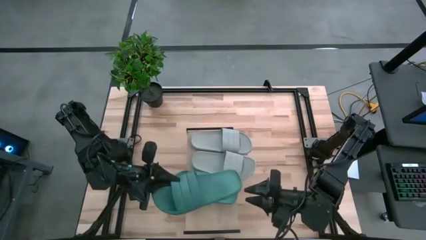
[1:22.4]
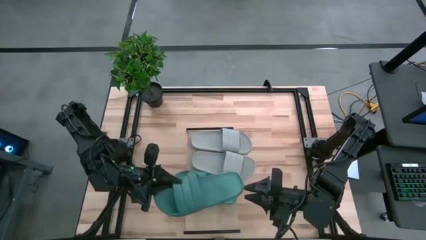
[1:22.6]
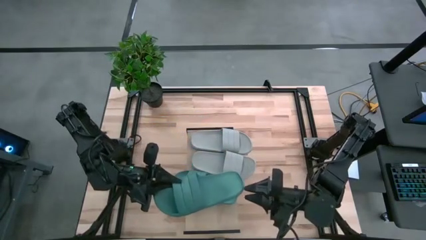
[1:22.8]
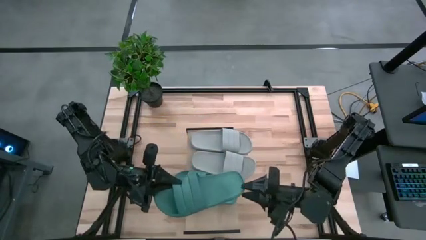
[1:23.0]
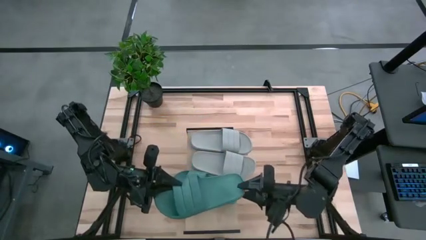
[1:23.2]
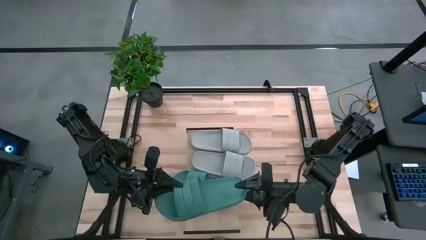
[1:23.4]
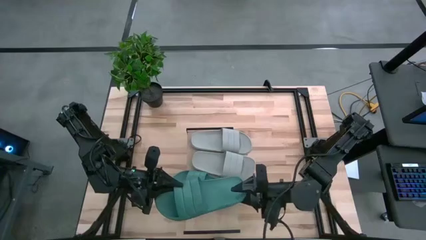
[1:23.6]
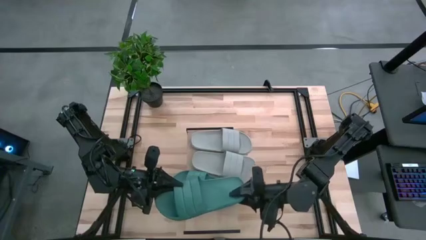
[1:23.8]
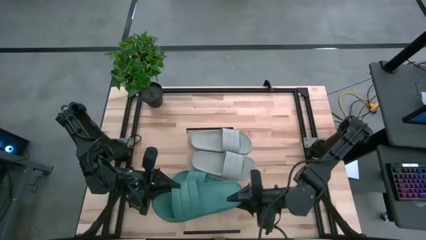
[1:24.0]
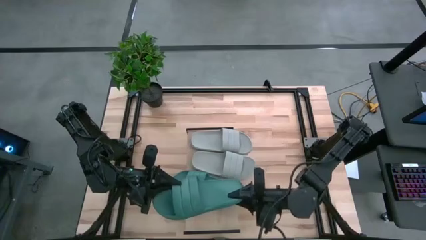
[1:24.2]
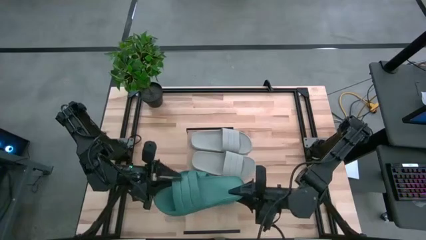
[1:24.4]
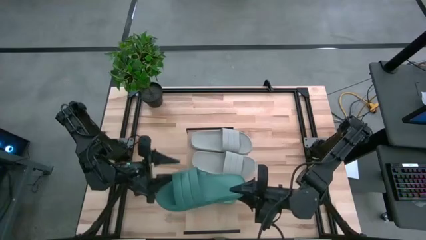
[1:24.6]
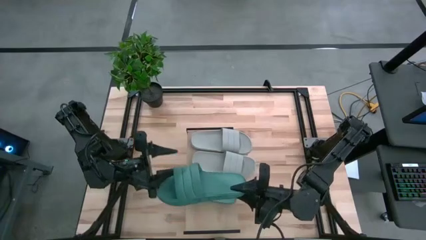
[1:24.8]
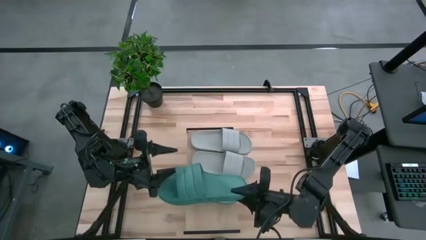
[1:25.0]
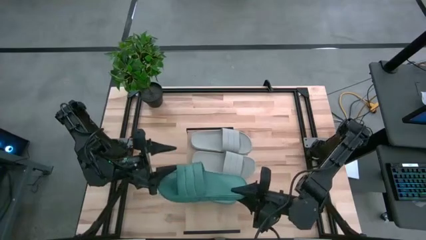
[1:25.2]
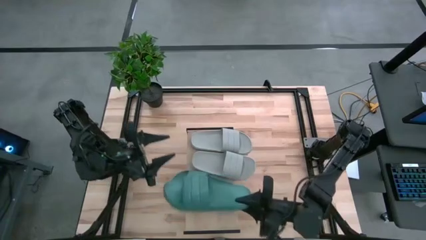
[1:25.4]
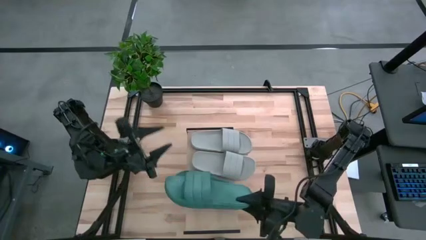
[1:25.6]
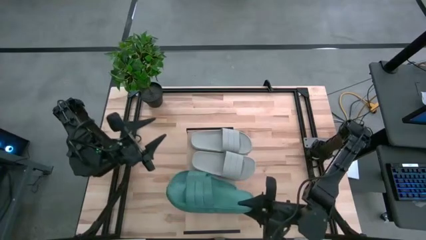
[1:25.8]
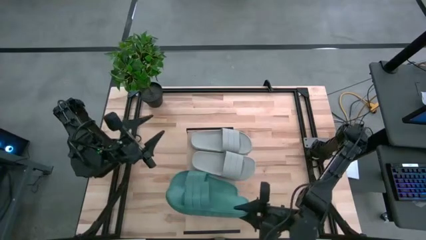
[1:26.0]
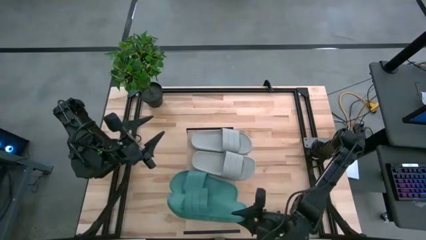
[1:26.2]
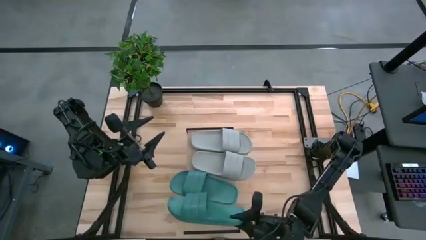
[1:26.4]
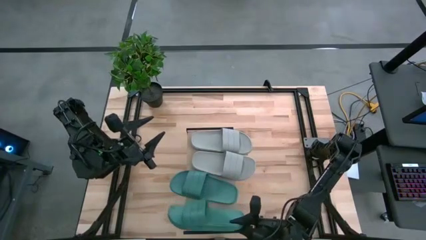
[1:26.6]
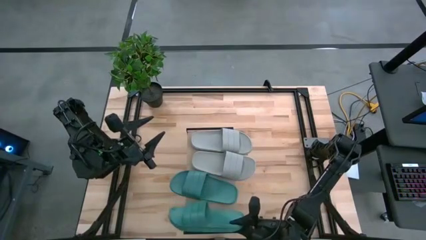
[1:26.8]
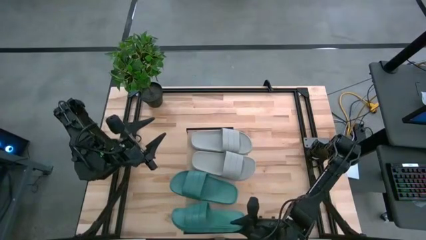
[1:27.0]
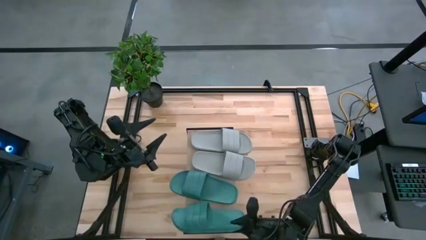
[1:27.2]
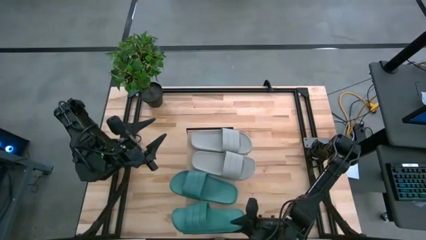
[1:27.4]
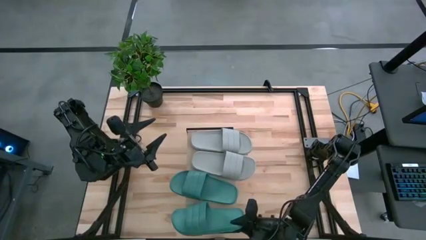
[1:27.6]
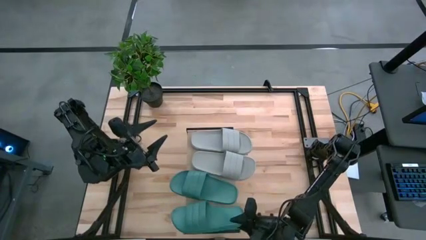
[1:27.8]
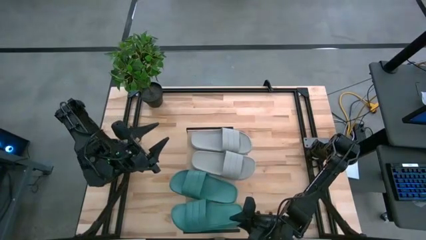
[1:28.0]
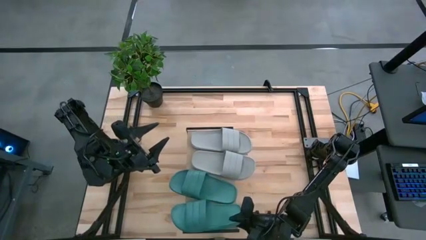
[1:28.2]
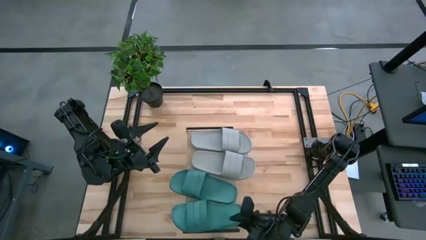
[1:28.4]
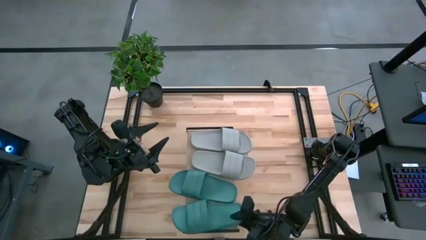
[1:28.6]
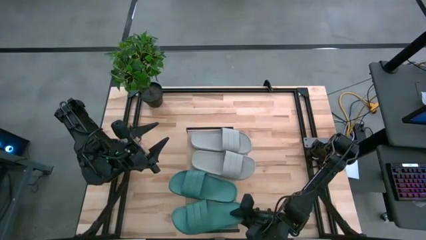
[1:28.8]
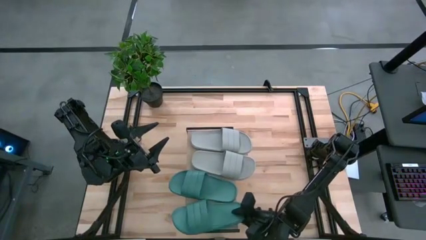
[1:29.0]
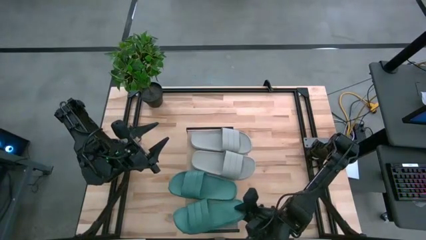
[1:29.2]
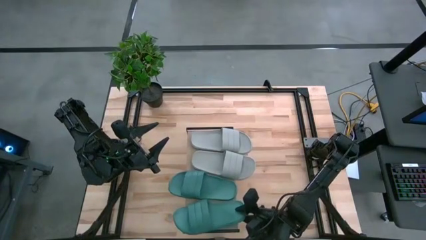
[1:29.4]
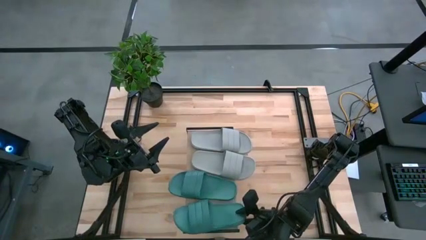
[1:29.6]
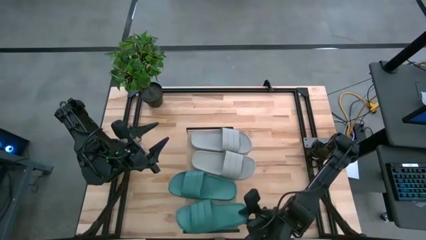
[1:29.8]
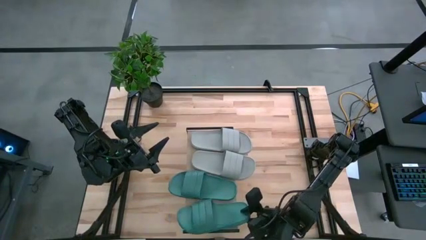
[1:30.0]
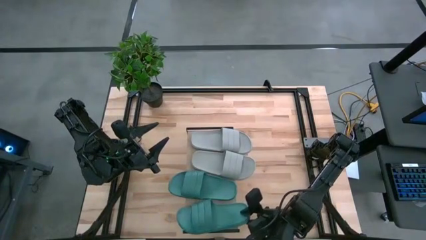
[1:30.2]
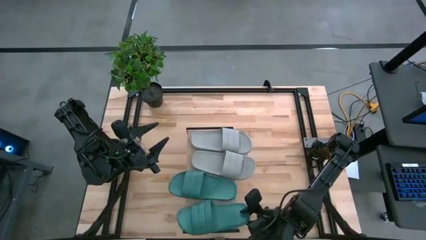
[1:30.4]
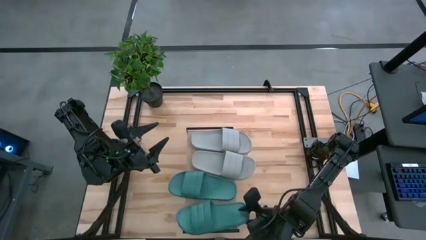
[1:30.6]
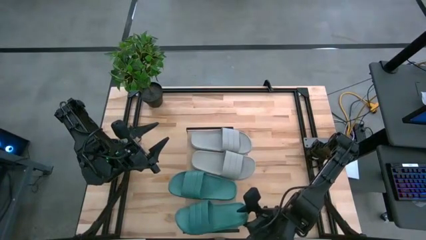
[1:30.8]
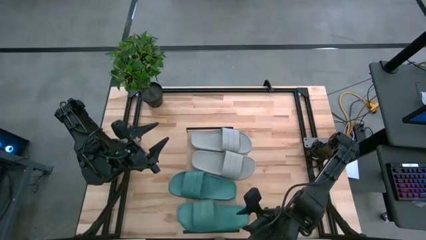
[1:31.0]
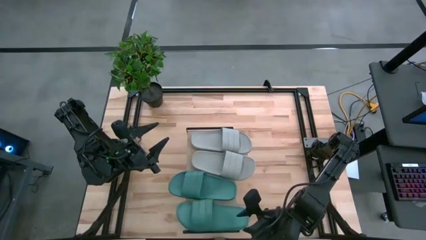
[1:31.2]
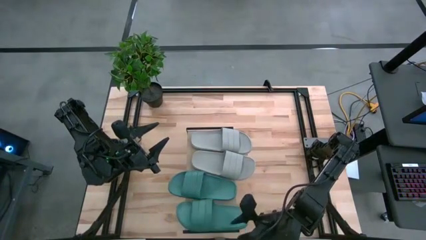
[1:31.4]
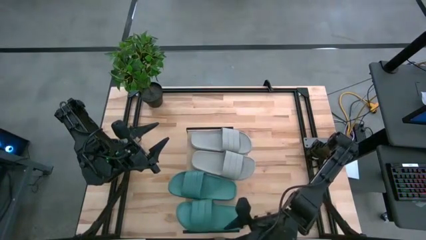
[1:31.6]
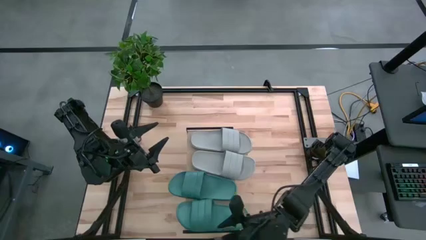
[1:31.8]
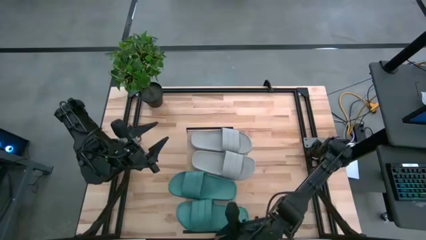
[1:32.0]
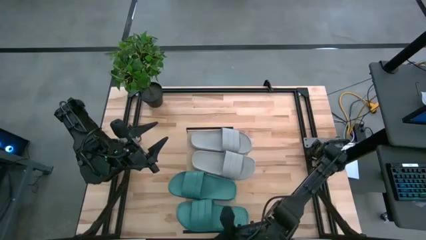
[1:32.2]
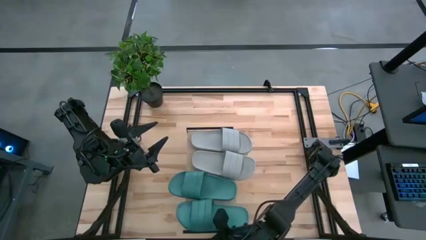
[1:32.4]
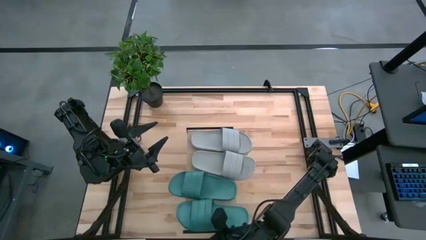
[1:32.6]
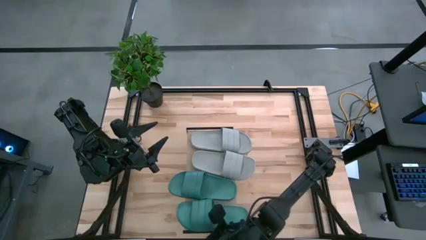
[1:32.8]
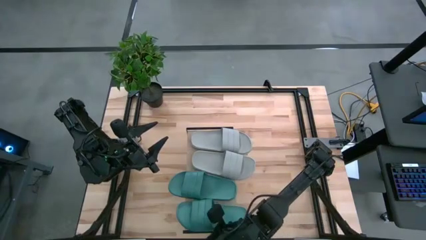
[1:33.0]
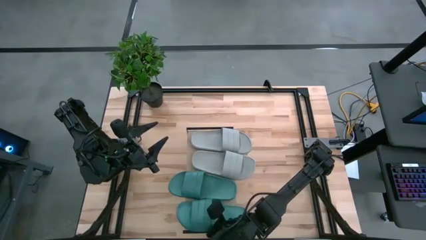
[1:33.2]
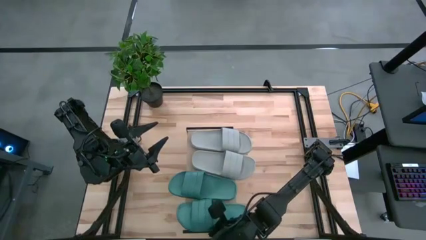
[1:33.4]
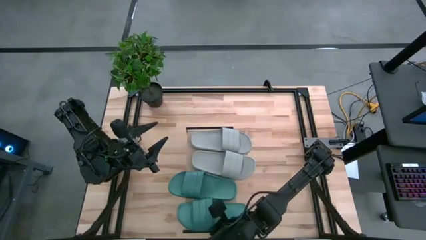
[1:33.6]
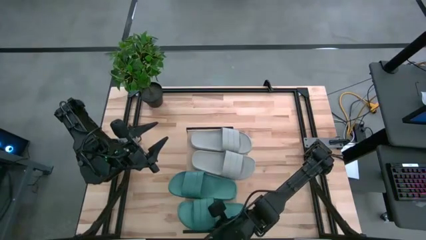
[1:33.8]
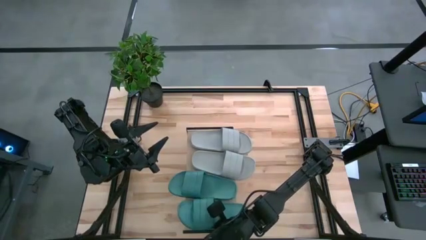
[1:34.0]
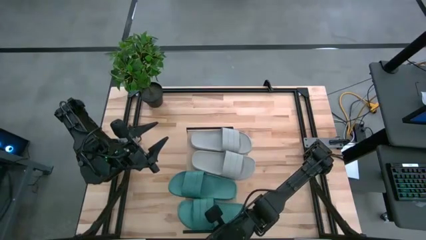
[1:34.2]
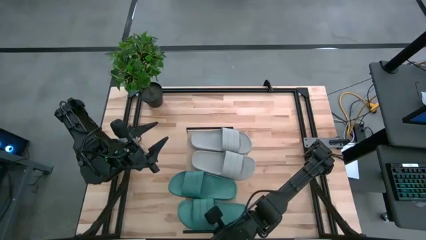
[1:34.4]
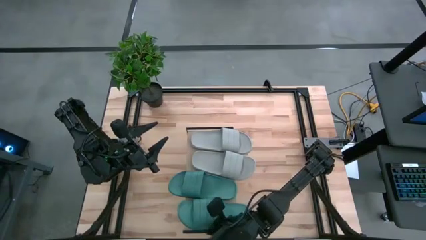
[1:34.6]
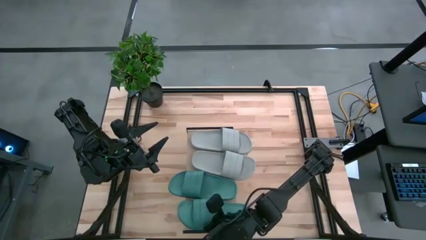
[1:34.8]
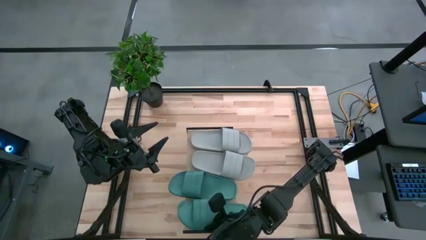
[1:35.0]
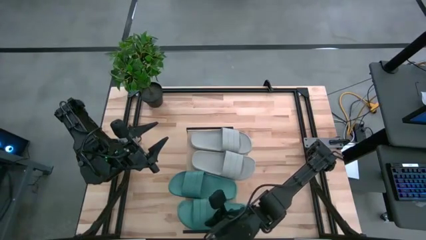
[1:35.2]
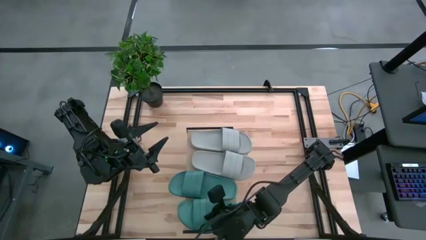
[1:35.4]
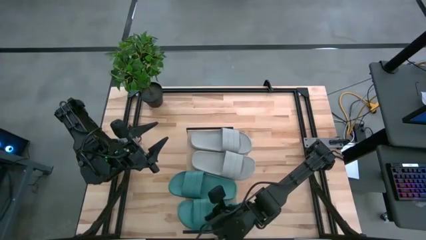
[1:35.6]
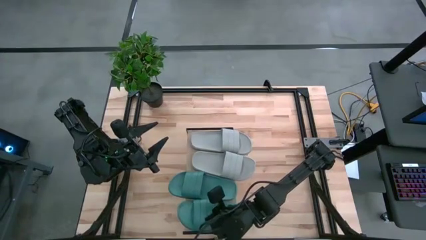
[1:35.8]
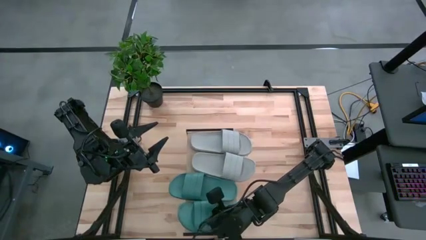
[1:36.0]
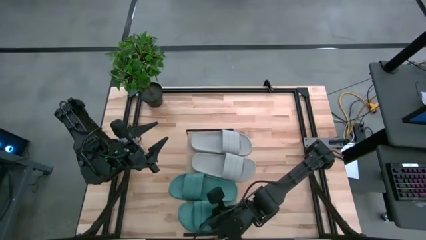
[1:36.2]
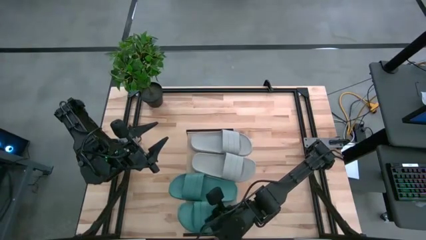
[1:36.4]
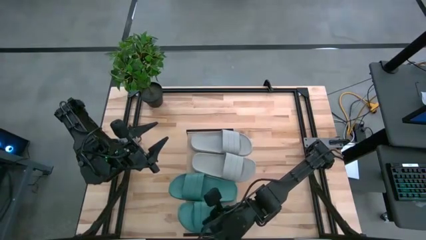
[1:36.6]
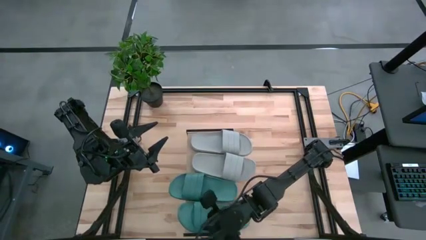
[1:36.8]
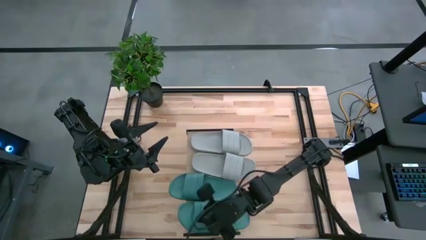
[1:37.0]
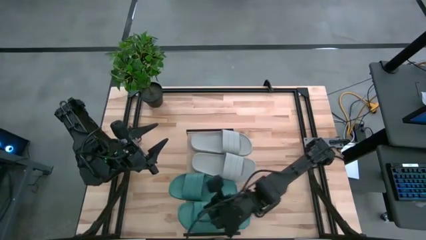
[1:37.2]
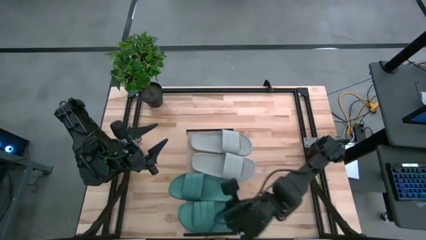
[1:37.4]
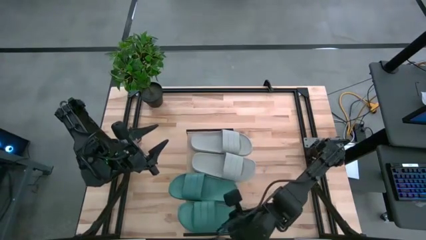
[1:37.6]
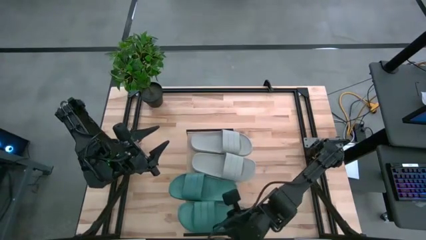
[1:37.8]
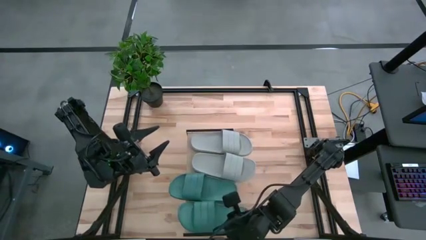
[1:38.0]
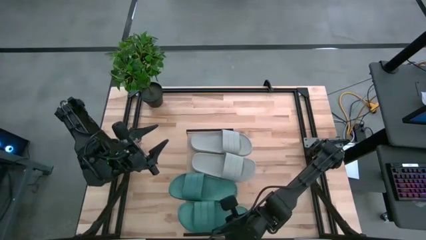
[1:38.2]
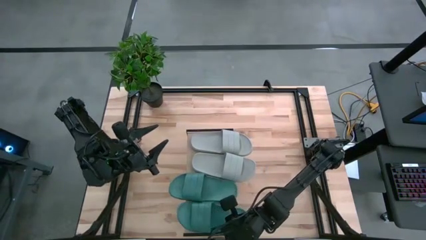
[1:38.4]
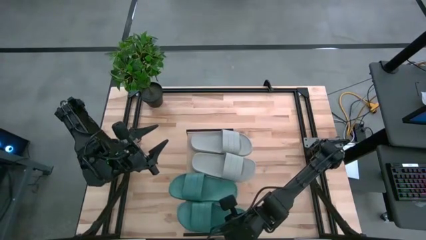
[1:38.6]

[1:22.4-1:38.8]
Task: Pick and place slides into the shelf
Put the green slipper on the shelf
